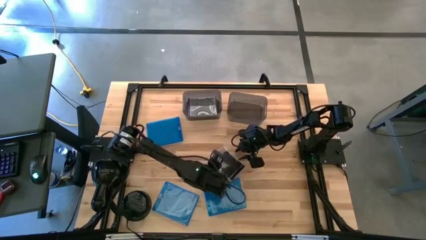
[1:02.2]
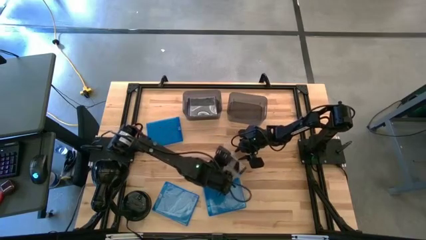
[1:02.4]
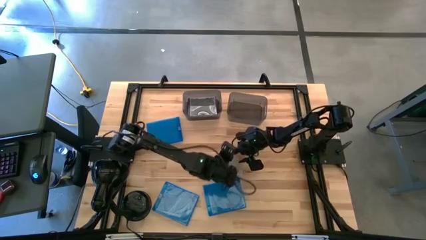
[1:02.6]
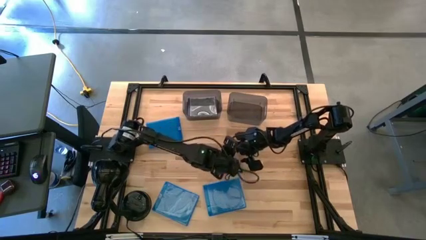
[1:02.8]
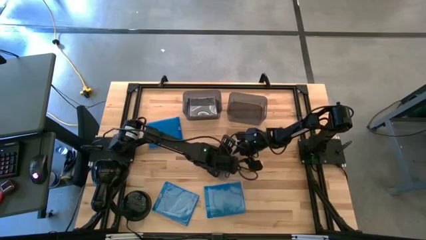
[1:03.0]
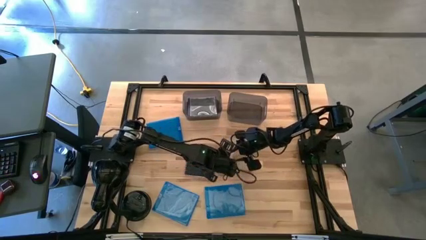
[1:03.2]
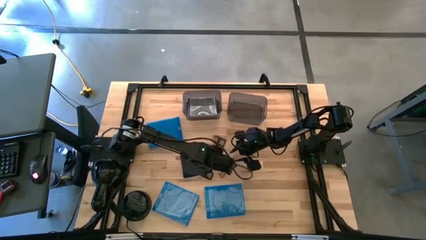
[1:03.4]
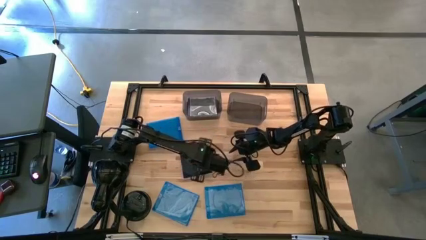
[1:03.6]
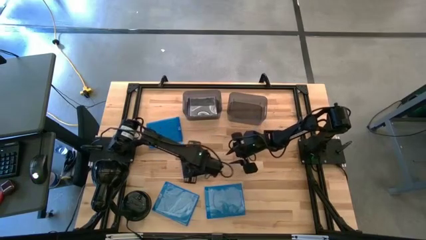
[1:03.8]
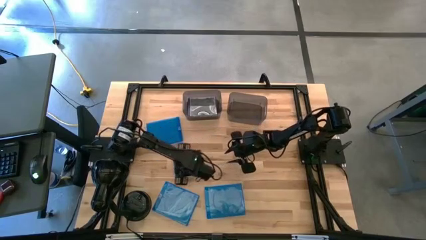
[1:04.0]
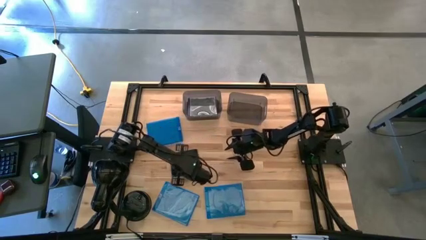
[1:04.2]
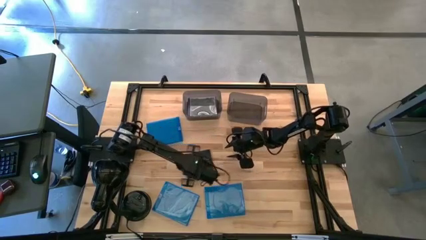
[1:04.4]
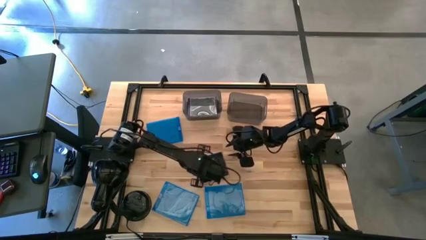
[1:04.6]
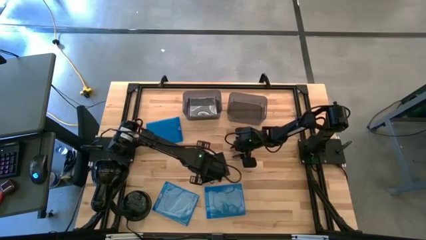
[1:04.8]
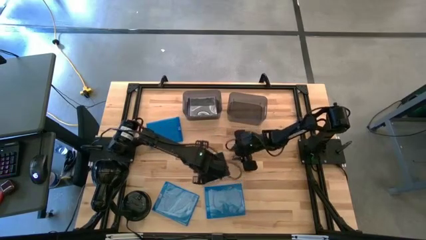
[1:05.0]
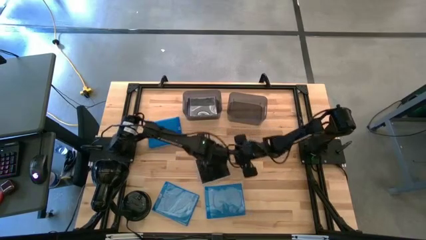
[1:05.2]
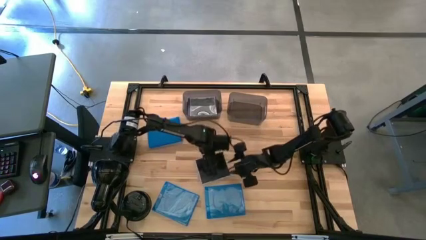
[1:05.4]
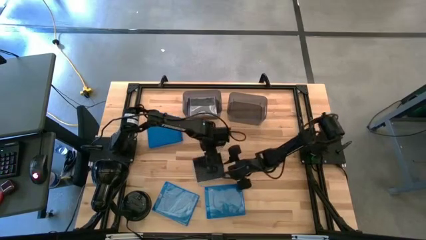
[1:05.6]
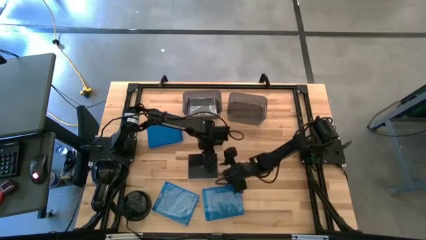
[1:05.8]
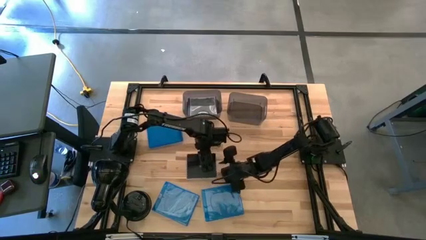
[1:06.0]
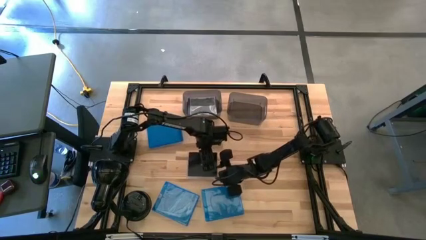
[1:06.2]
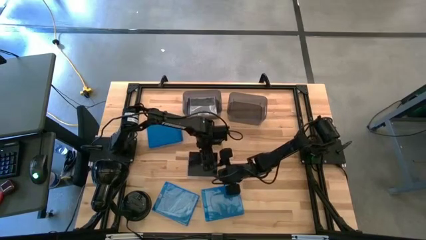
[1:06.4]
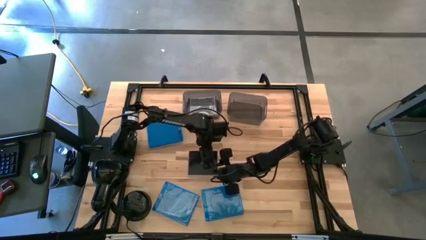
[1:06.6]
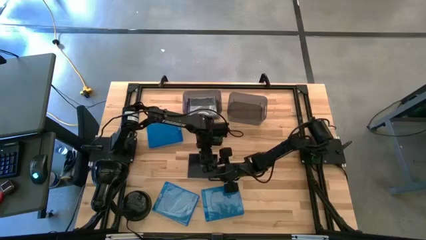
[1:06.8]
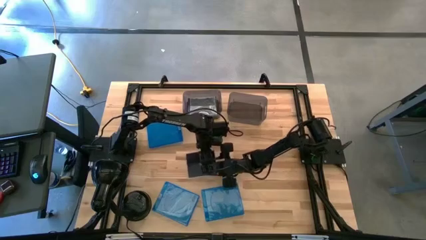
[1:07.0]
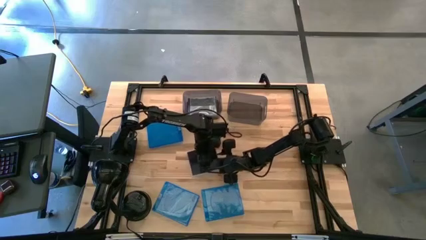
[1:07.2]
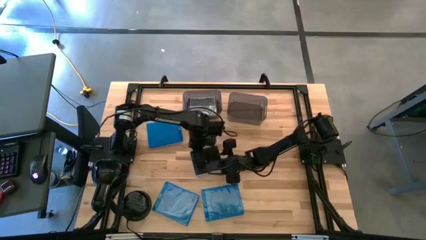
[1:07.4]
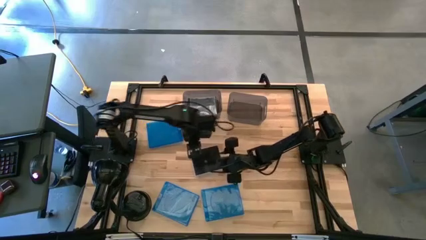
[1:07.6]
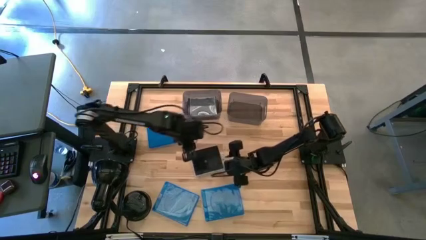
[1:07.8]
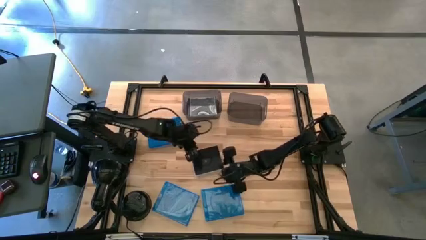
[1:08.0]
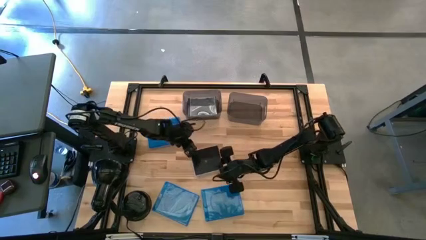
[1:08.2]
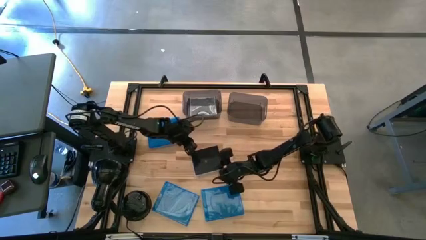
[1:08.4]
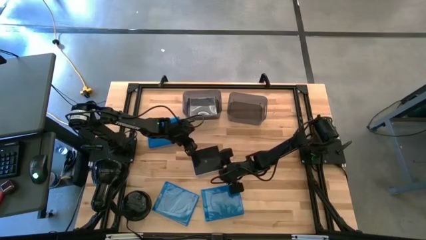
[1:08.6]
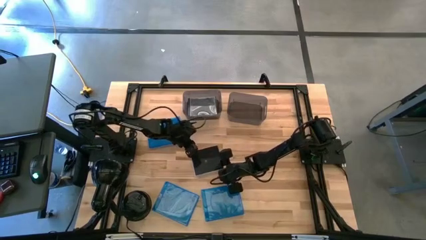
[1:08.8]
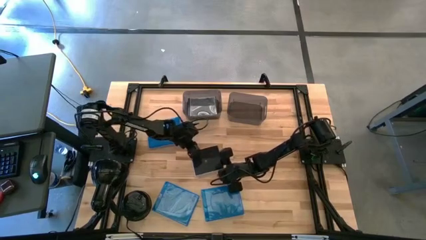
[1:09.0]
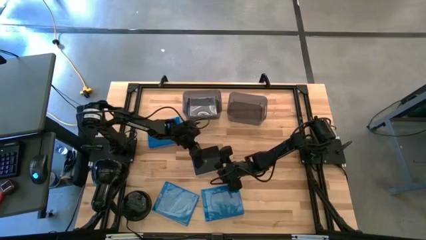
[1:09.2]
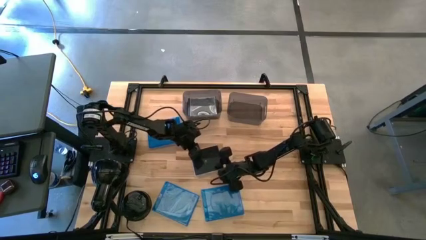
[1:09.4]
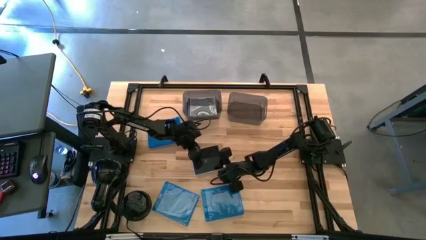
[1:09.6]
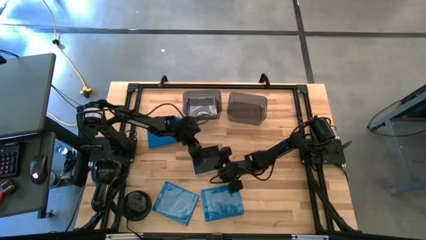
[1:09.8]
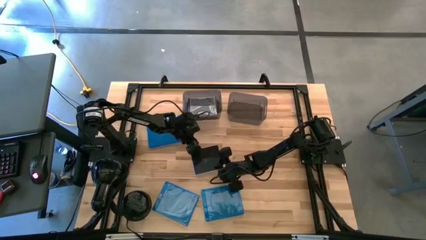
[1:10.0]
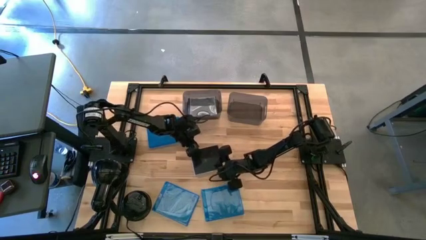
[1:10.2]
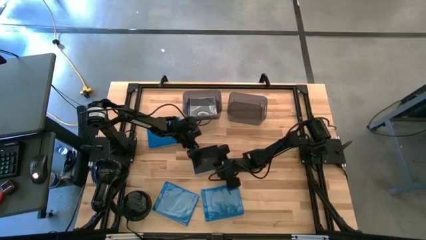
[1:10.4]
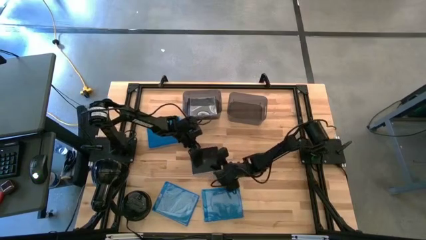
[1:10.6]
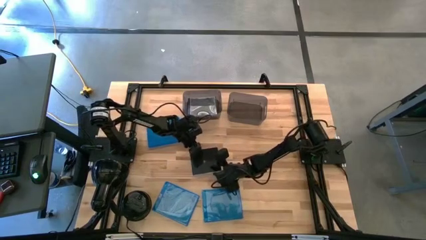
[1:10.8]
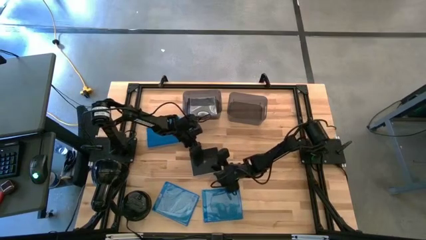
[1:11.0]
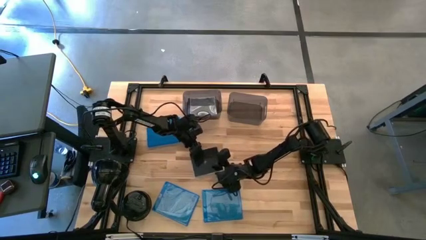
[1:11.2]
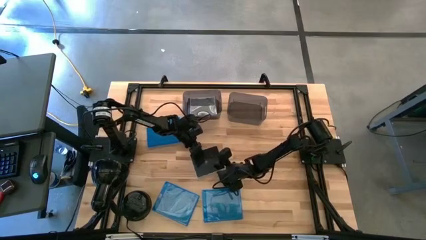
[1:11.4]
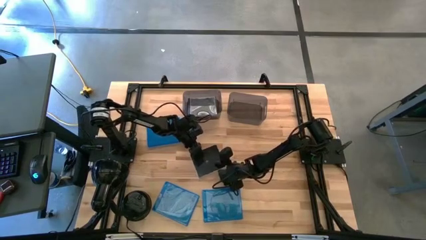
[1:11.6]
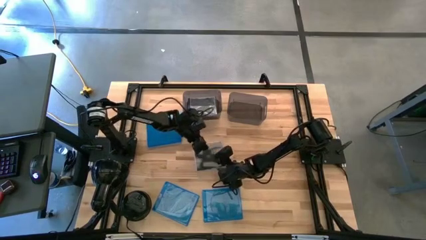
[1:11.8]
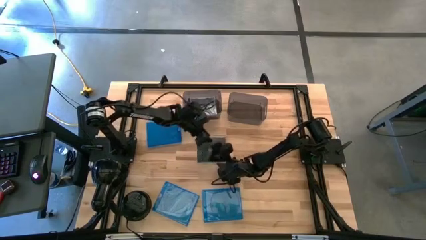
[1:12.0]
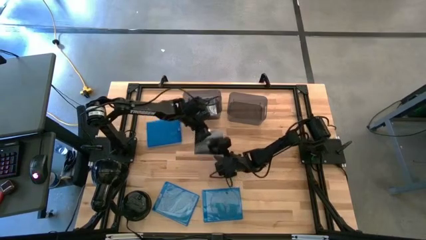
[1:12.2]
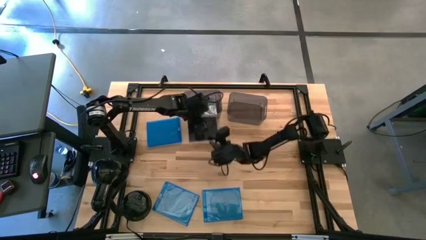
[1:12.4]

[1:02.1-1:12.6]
Task: Pick & place jewel cases by type
Put the black CD case into the left black bin

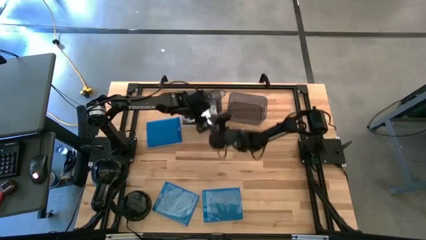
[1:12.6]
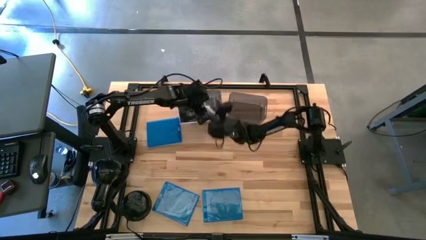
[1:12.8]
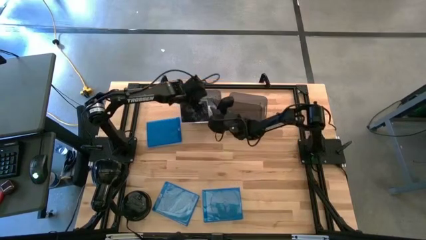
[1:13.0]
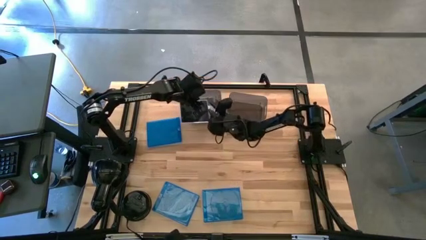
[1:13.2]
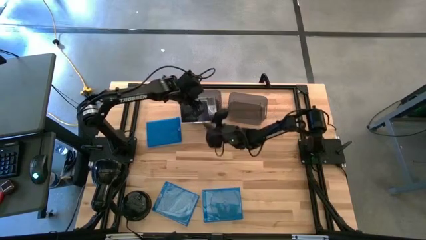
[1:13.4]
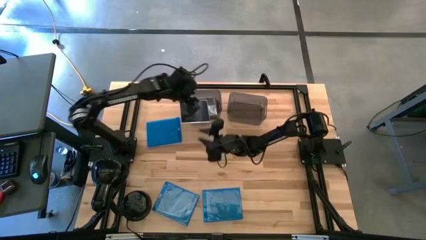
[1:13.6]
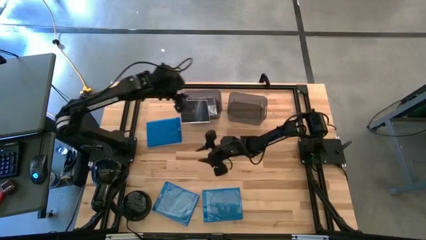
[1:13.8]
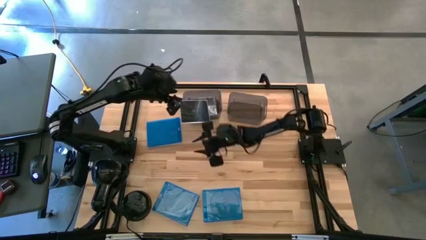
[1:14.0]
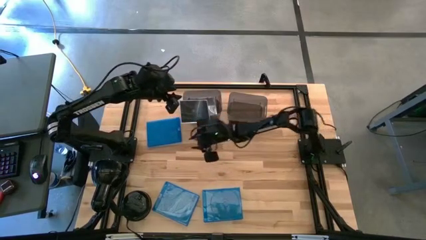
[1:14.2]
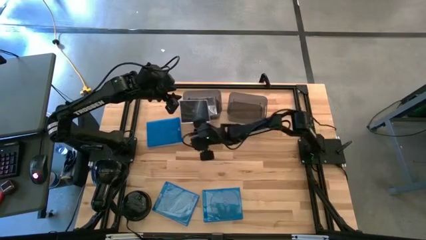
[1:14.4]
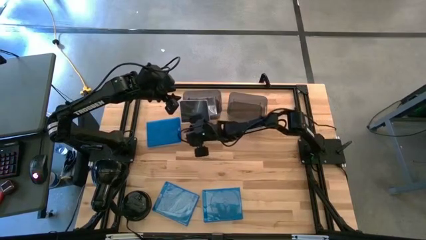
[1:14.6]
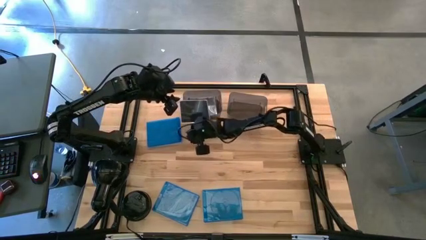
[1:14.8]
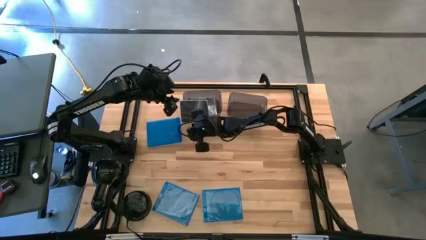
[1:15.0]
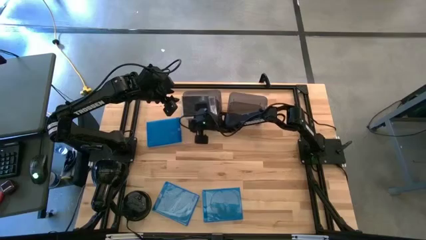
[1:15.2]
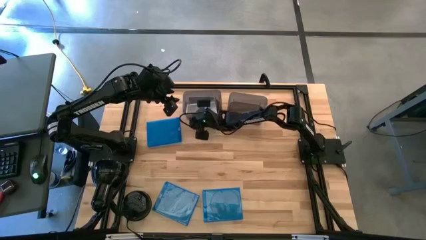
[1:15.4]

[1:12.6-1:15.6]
Put the black CD case into the left black bin
